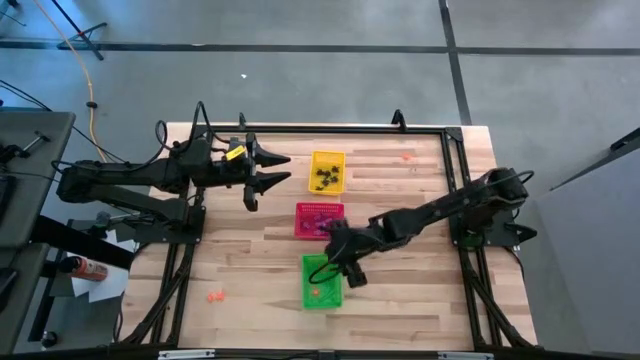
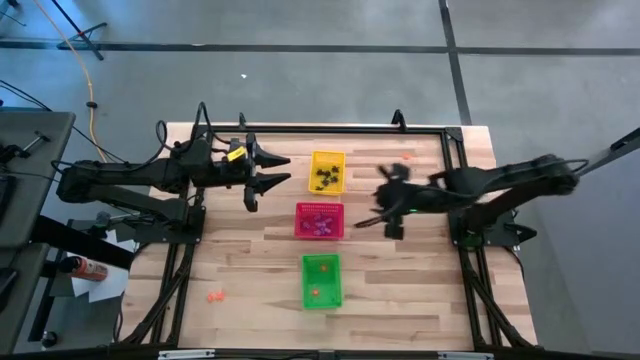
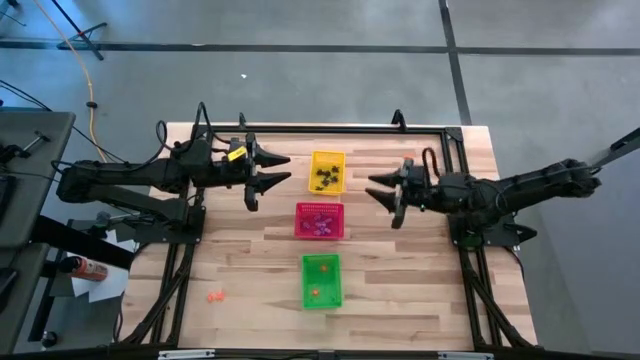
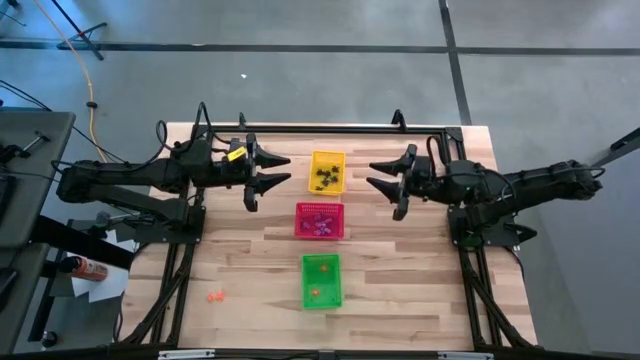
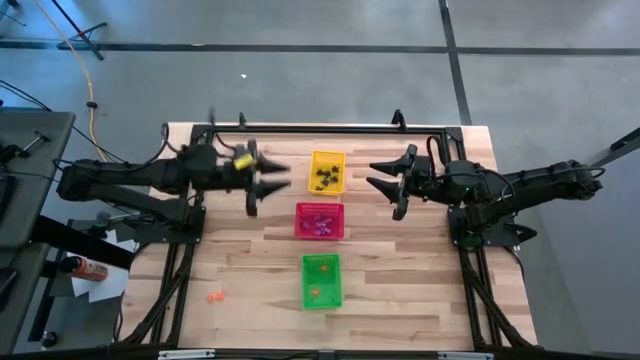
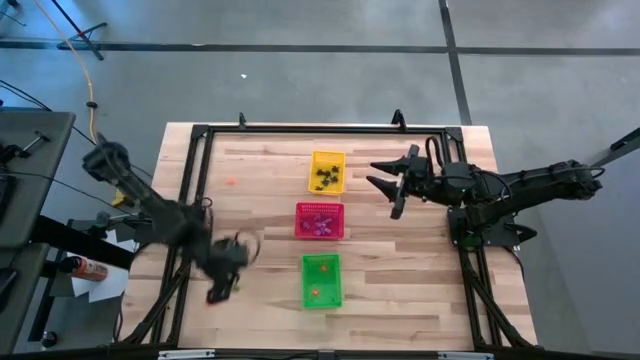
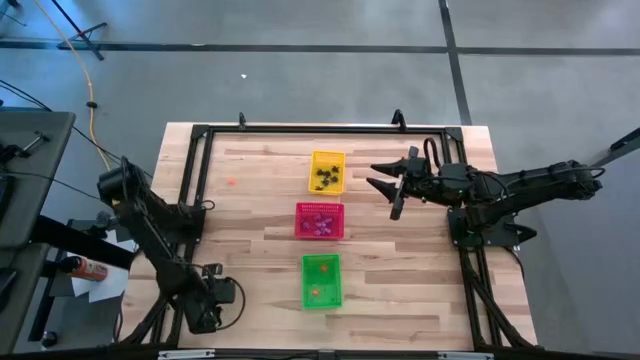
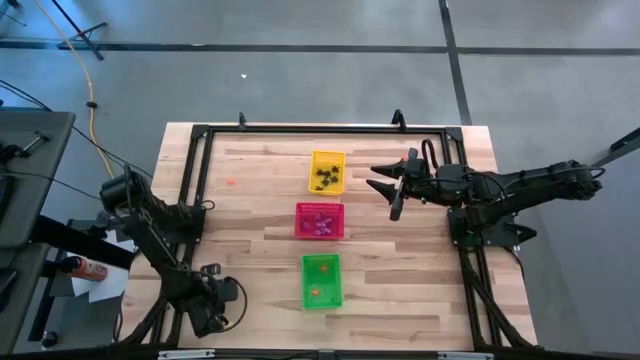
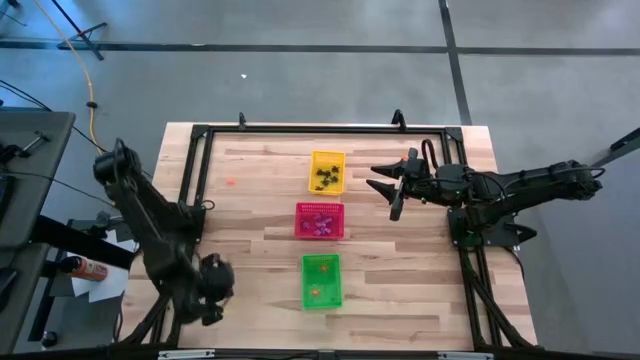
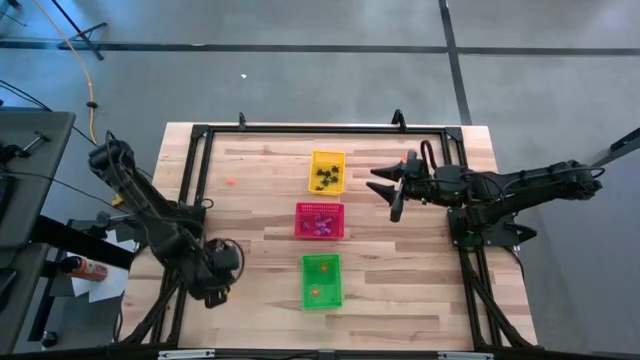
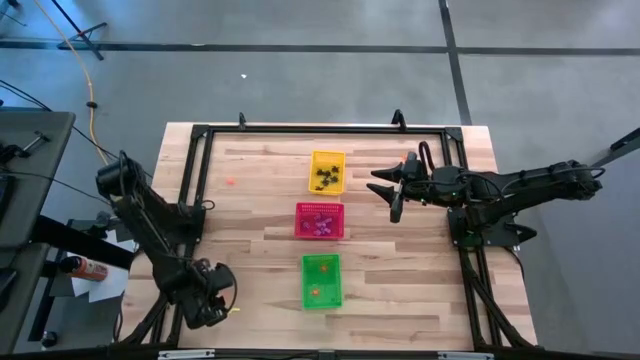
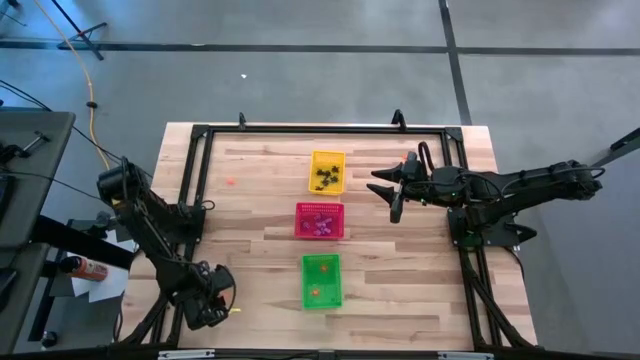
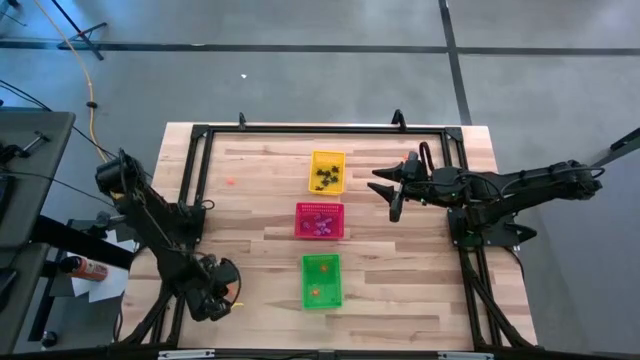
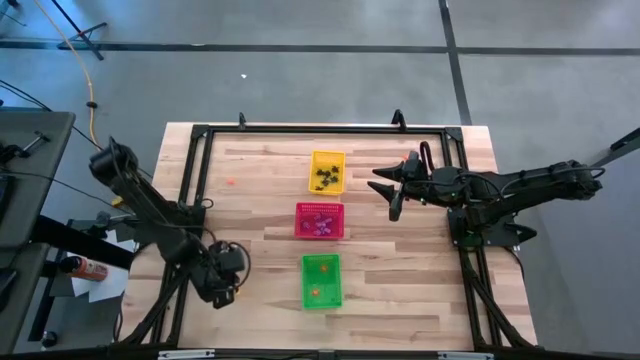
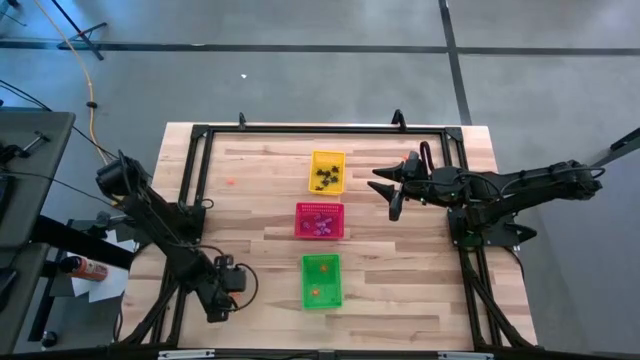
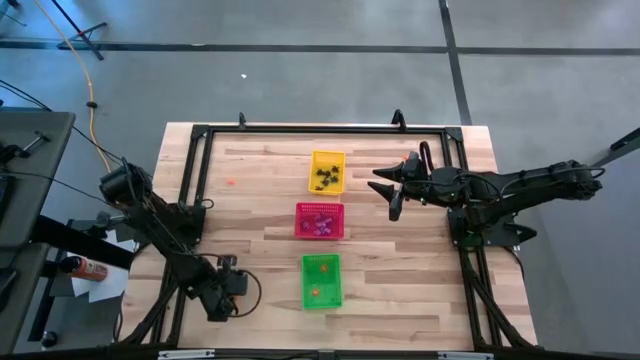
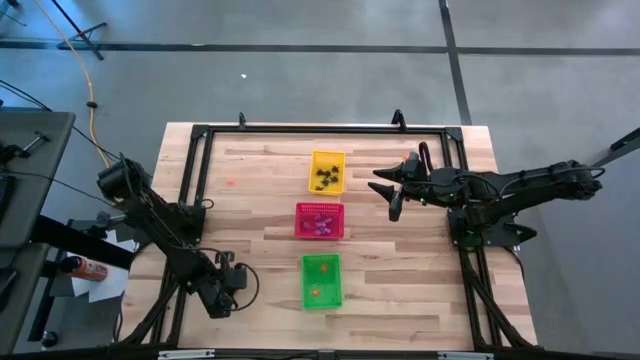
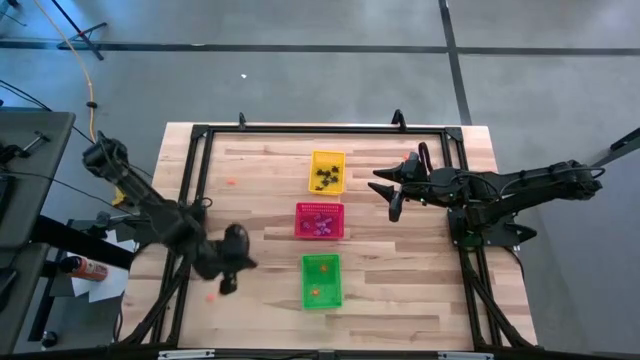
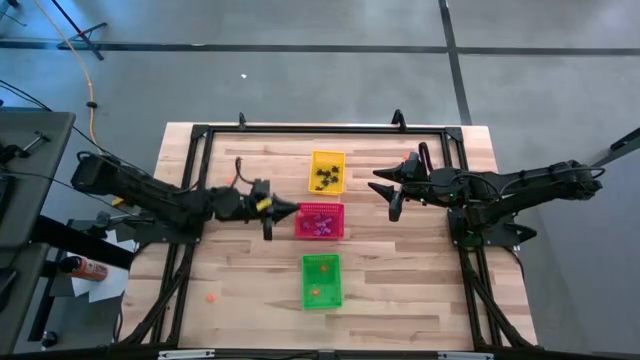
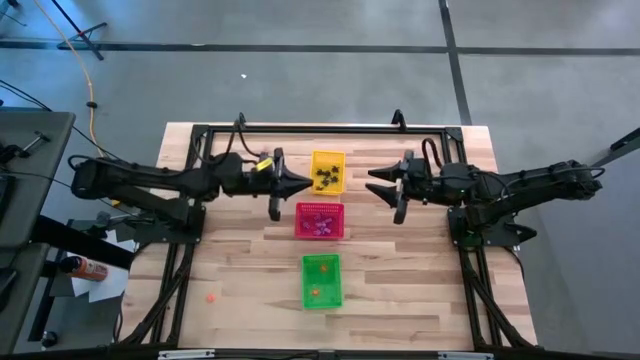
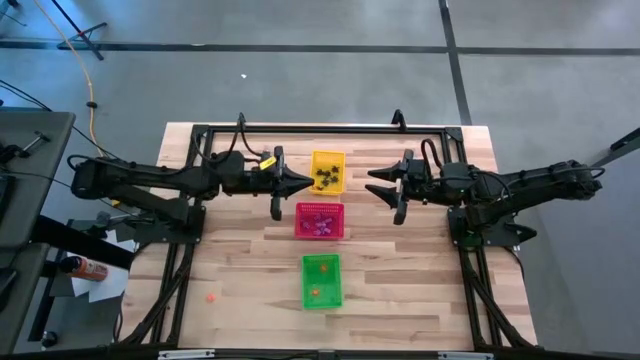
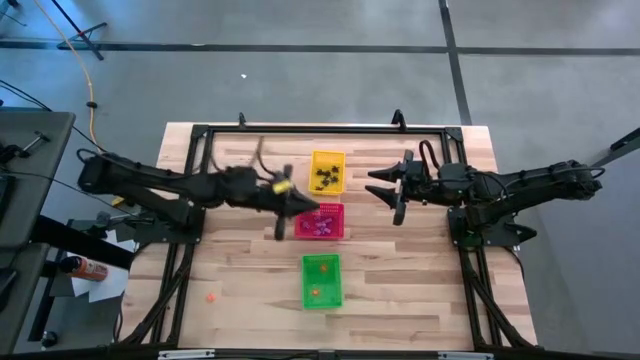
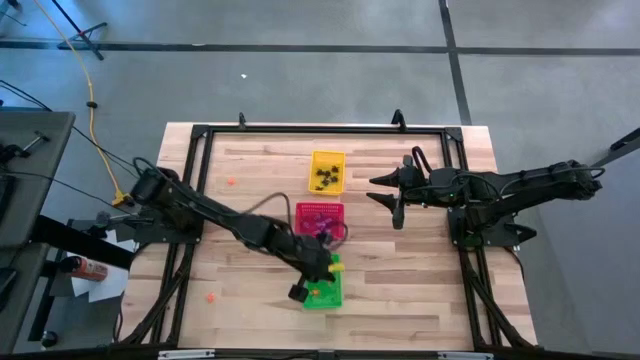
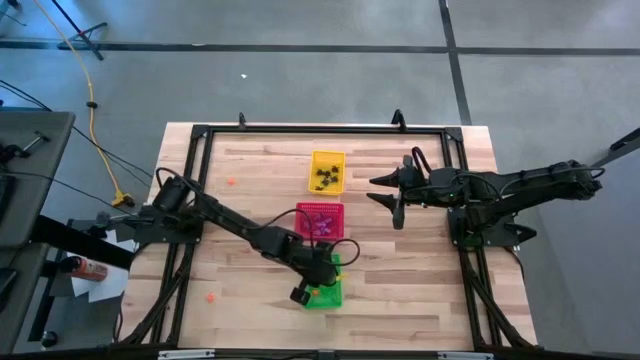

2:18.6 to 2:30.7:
Task: Sort Halloween decoration
Put the orange spider toy into the green bin

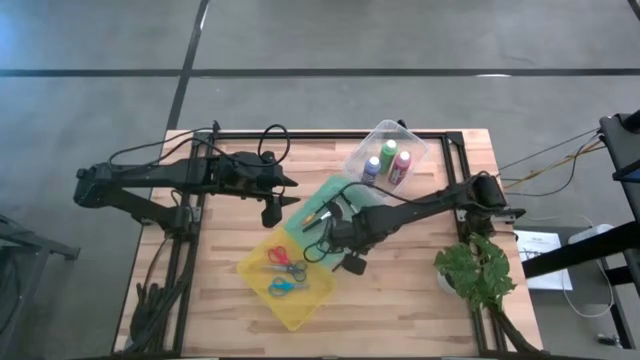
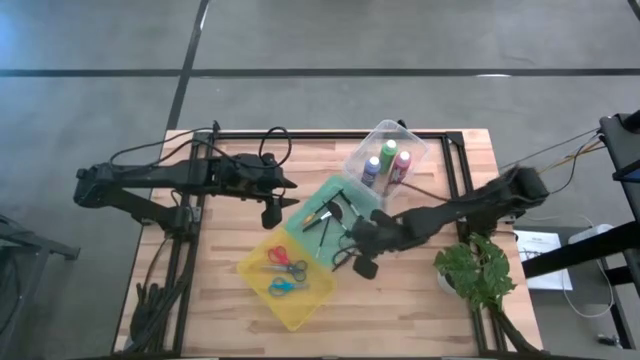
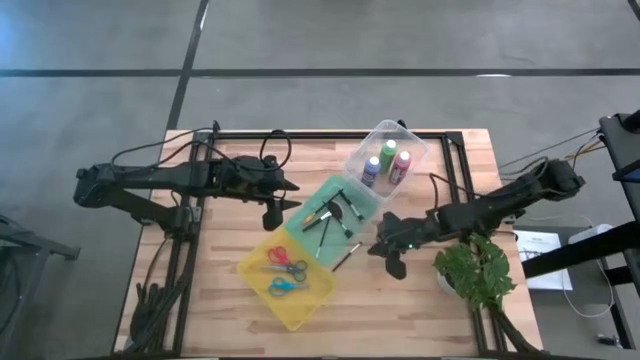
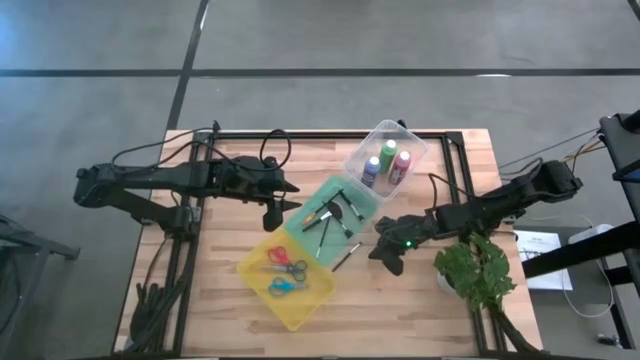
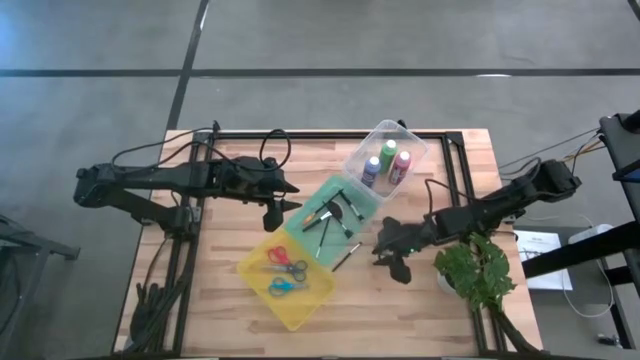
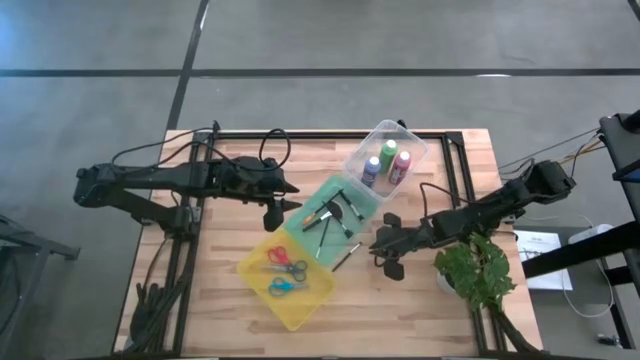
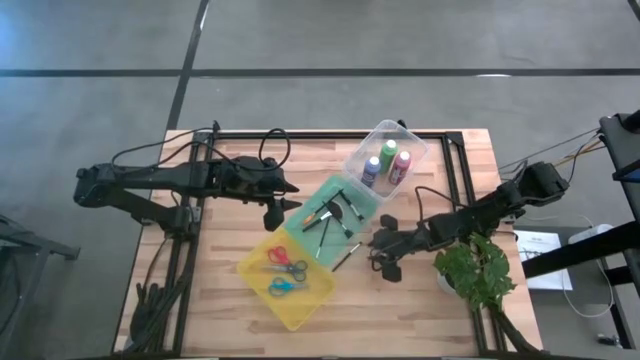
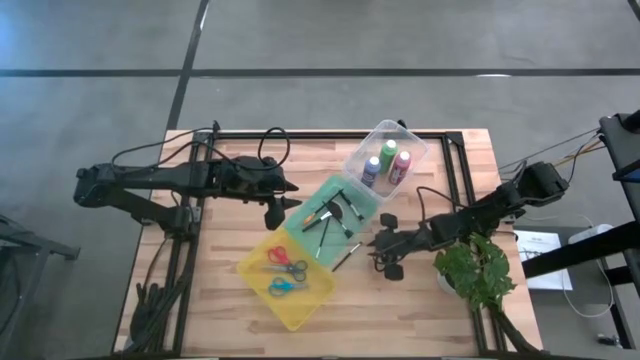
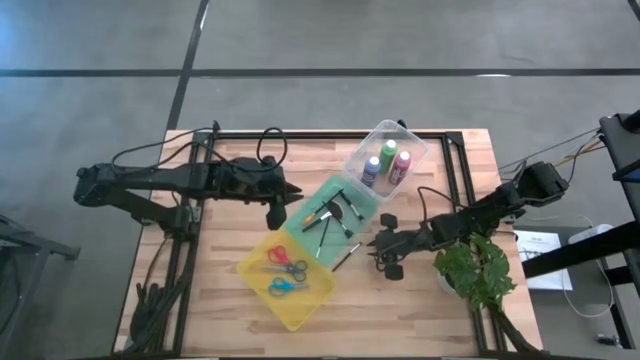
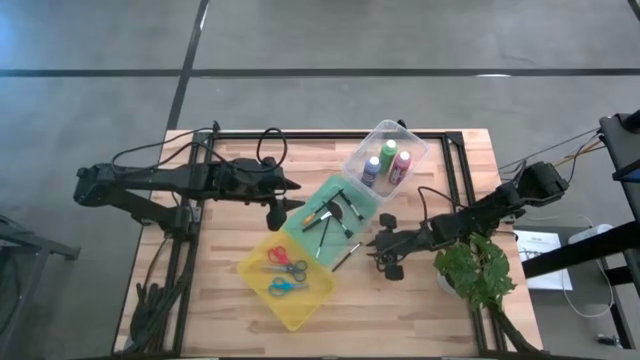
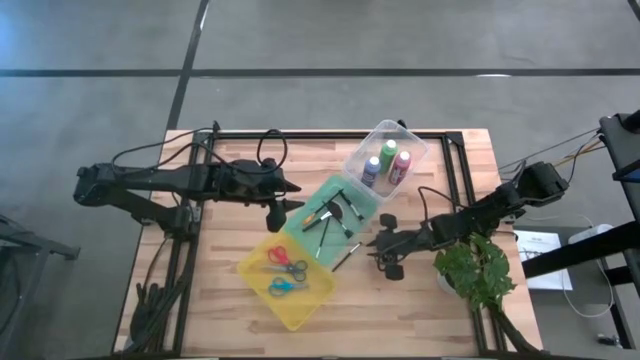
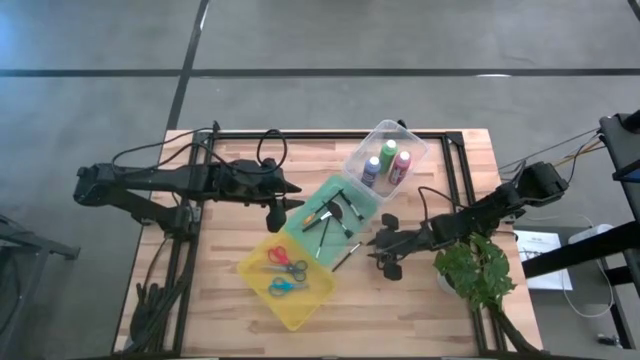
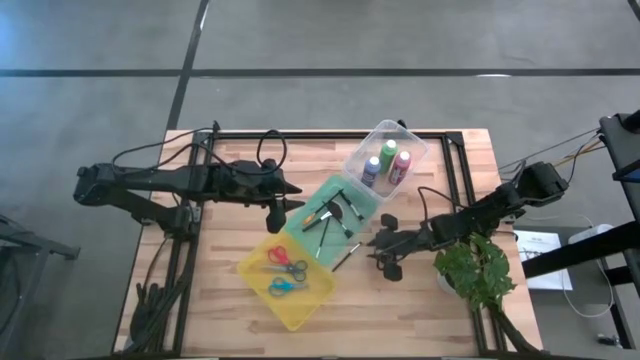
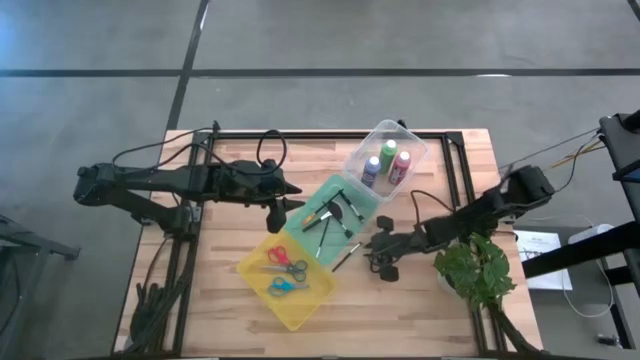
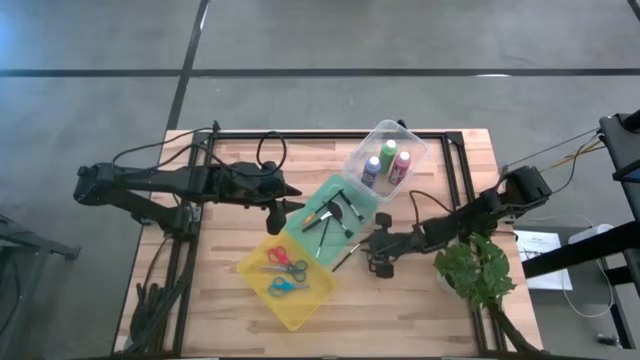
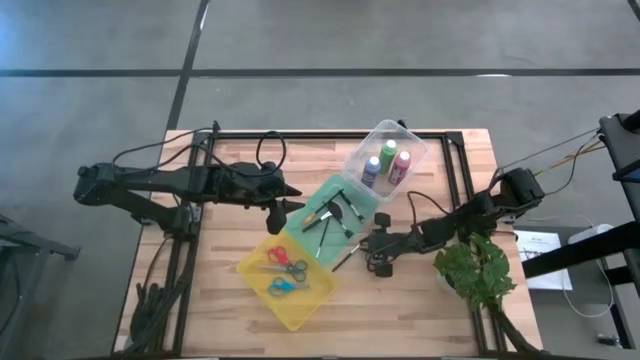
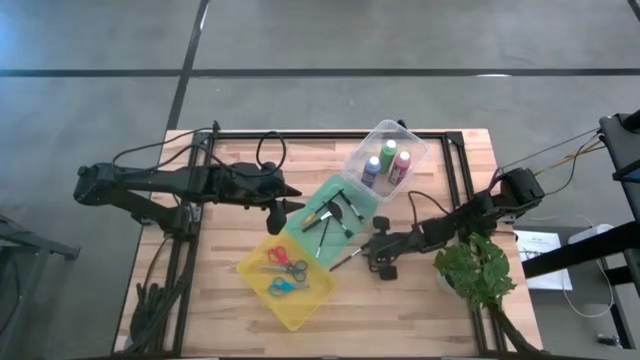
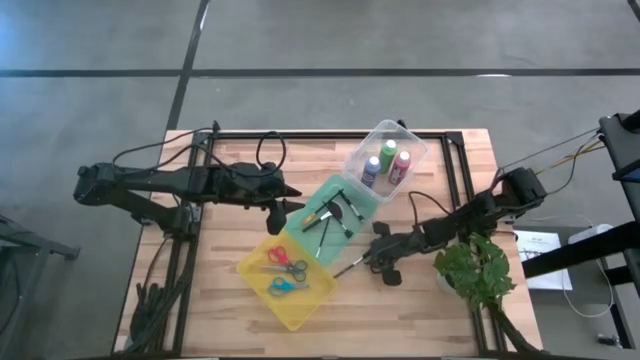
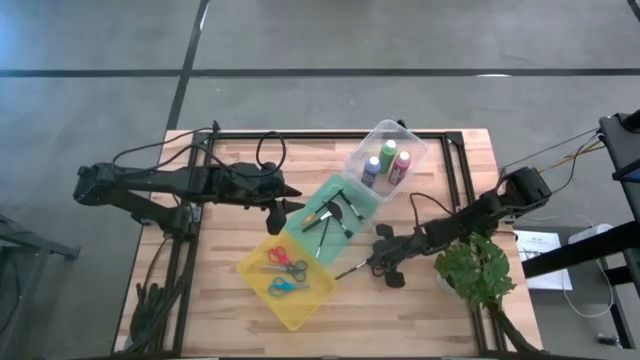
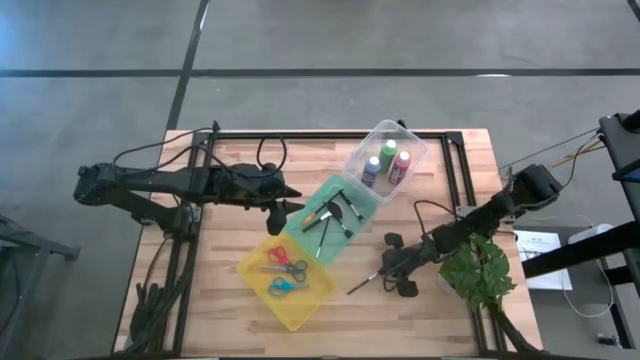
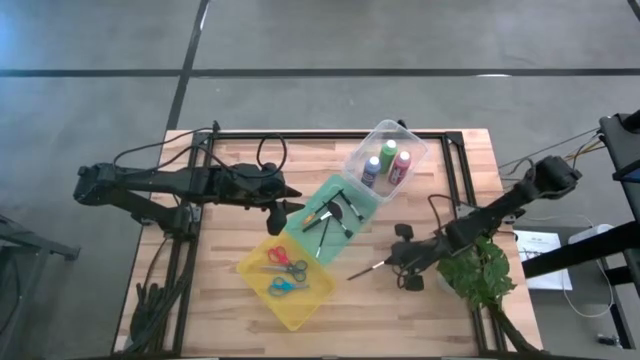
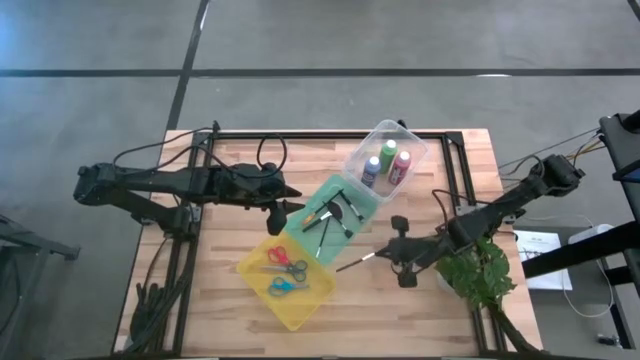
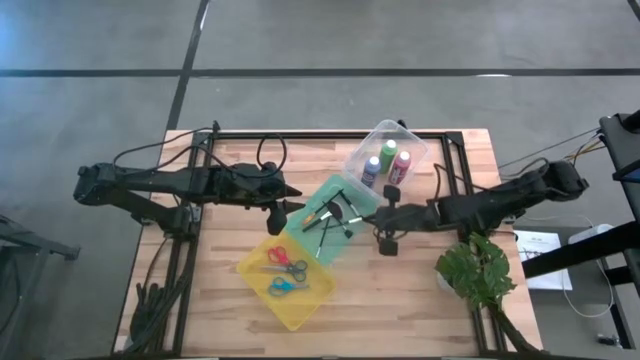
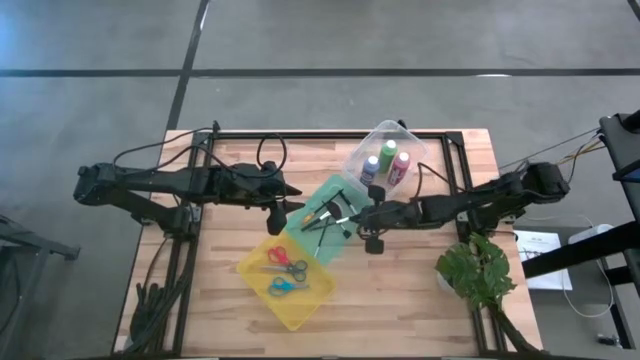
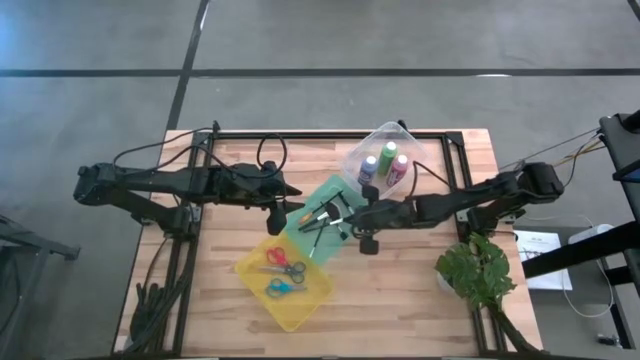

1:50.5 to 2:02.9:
Task: Pick & Place Paint Supplies
Put the black eyeshadow brush into the green bin
